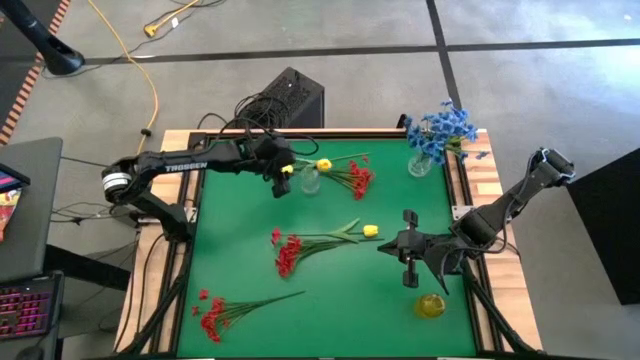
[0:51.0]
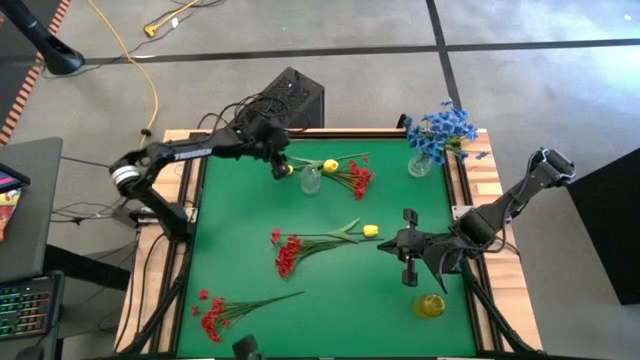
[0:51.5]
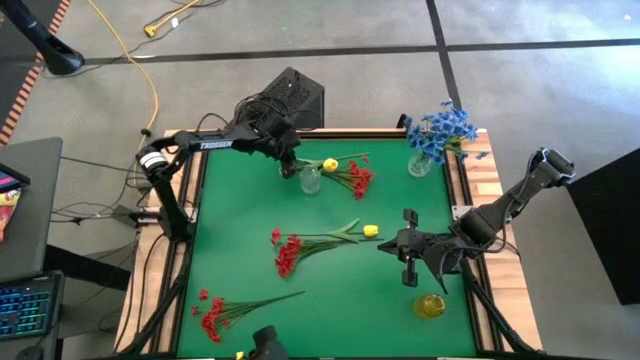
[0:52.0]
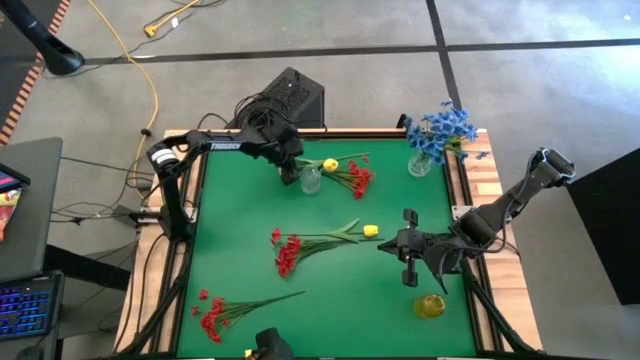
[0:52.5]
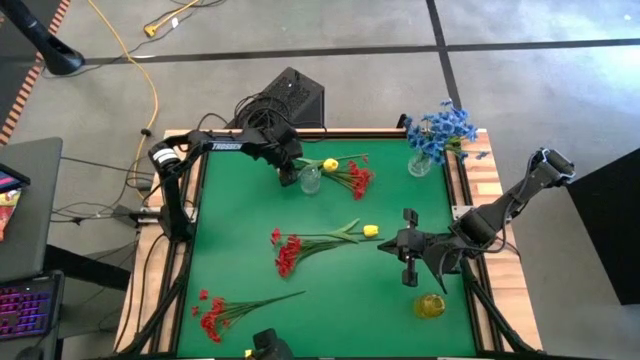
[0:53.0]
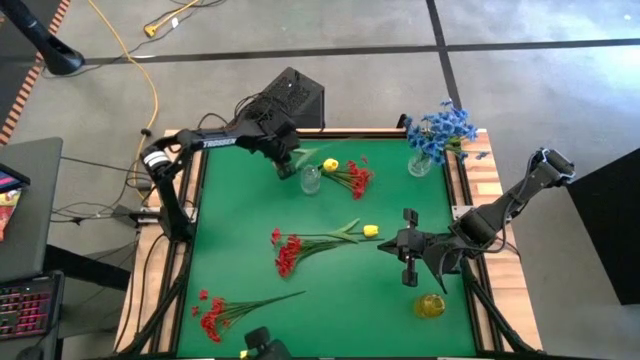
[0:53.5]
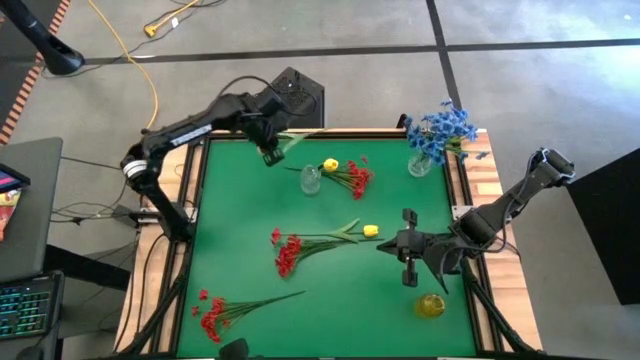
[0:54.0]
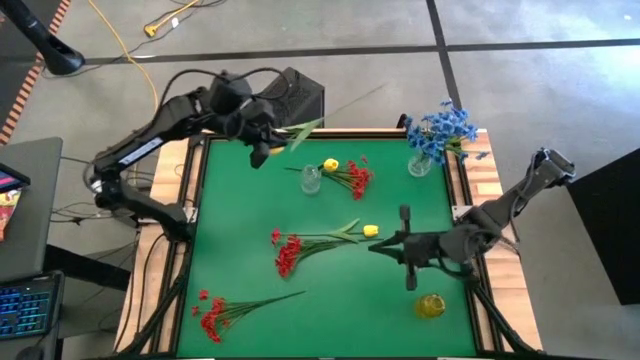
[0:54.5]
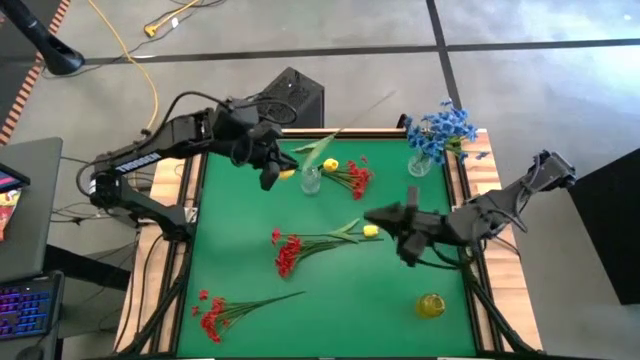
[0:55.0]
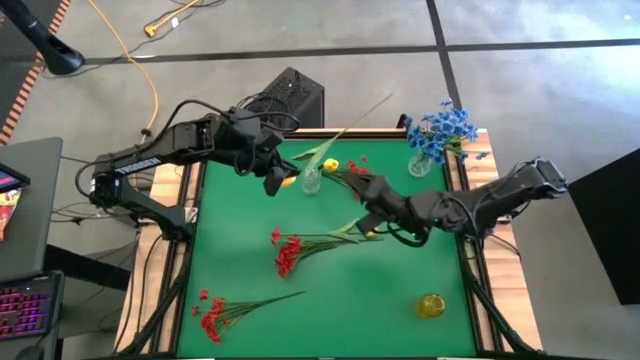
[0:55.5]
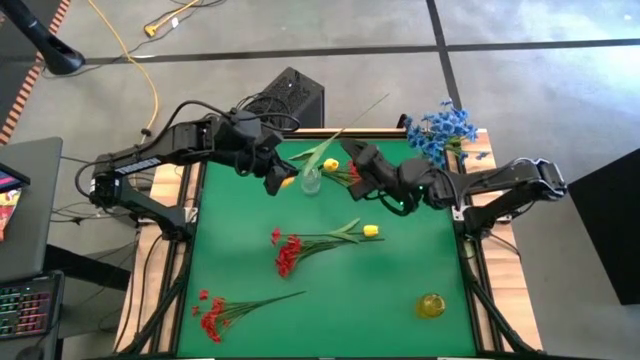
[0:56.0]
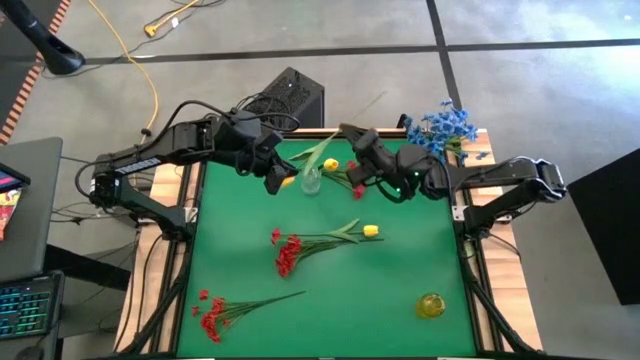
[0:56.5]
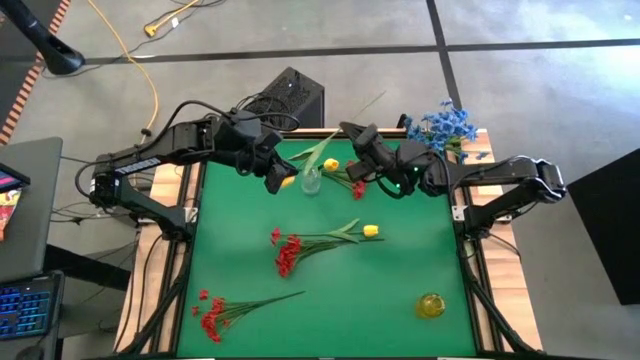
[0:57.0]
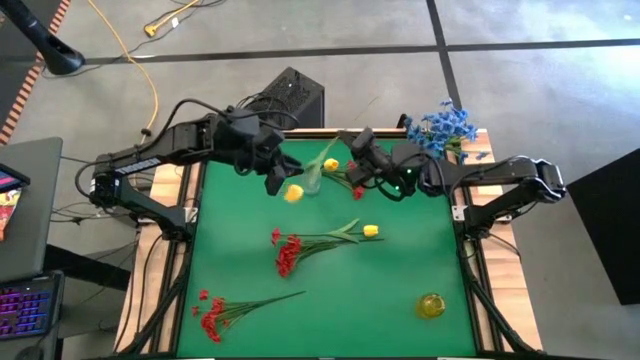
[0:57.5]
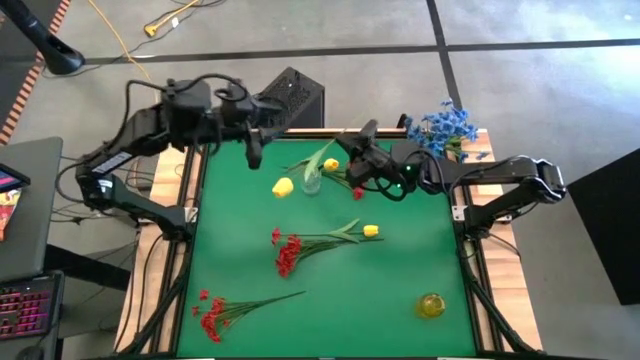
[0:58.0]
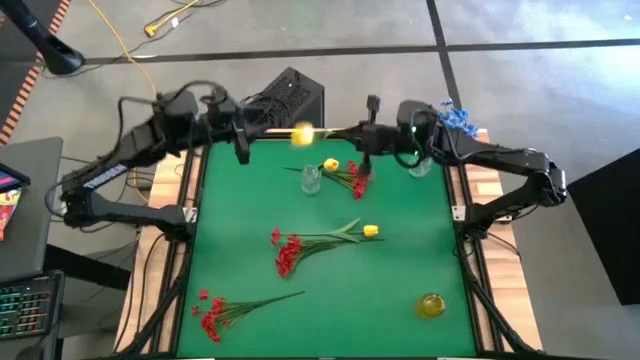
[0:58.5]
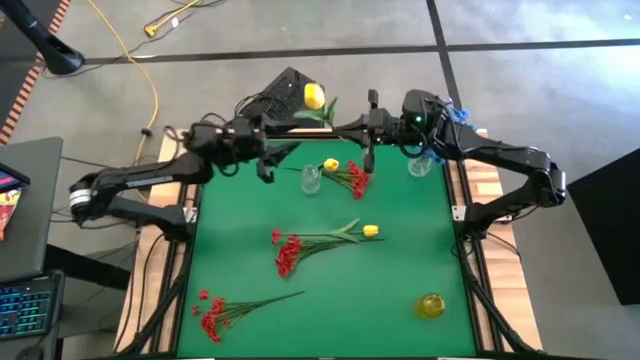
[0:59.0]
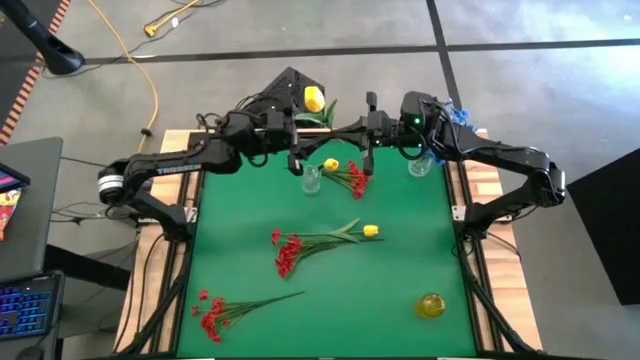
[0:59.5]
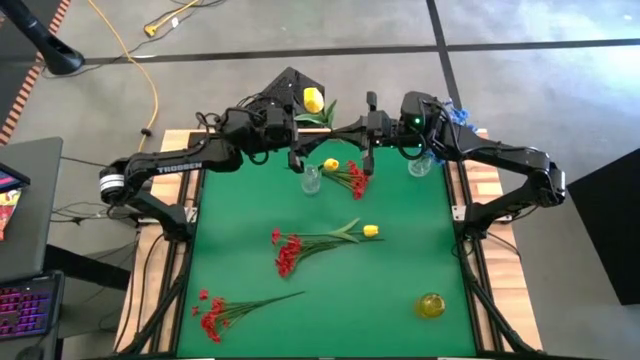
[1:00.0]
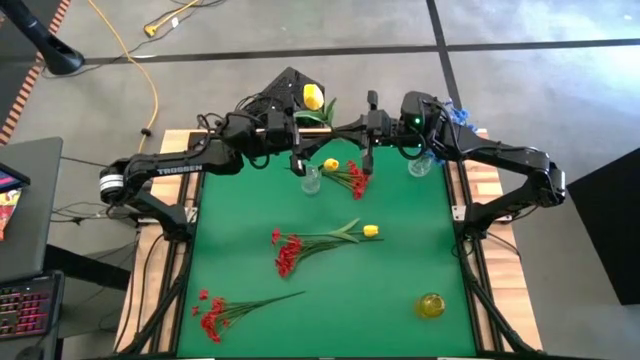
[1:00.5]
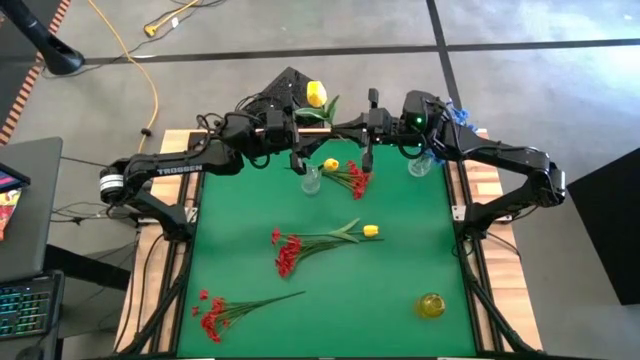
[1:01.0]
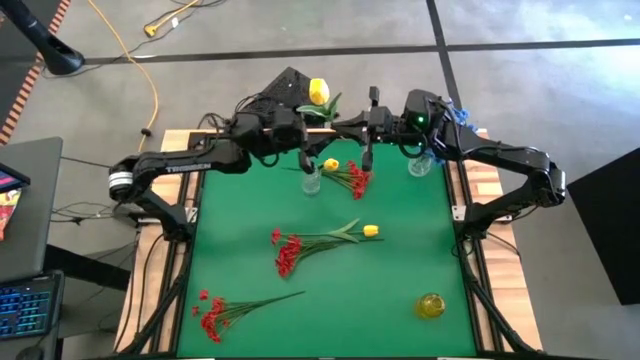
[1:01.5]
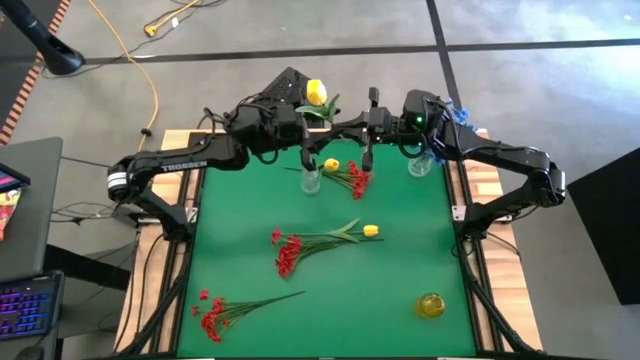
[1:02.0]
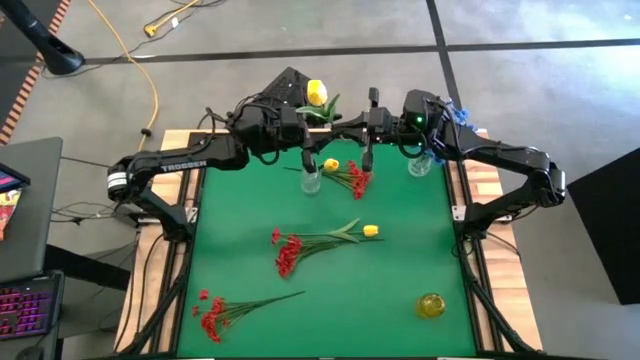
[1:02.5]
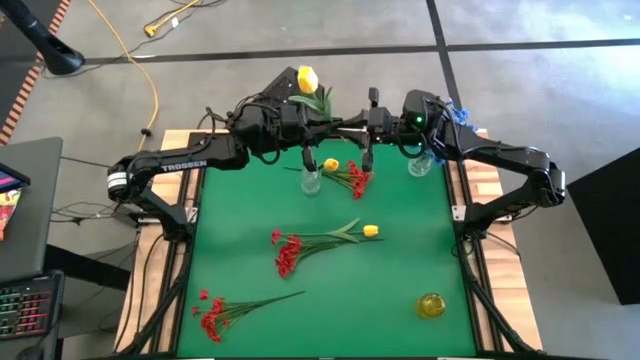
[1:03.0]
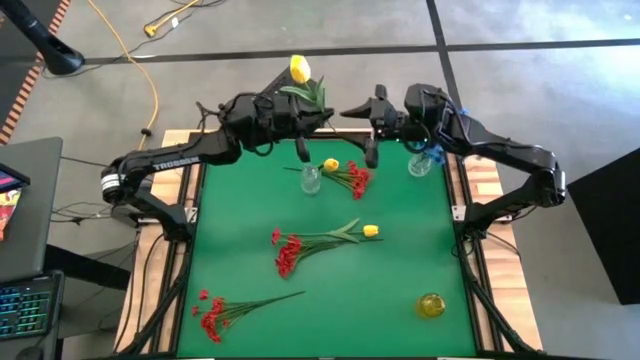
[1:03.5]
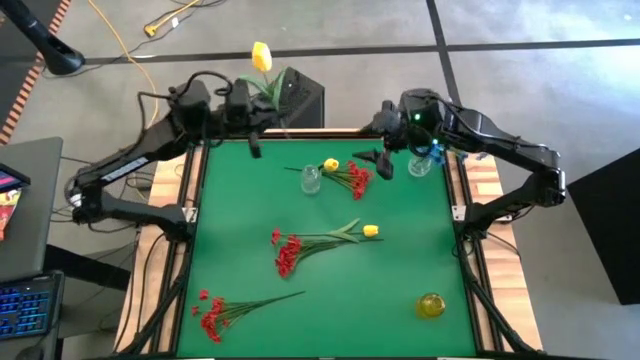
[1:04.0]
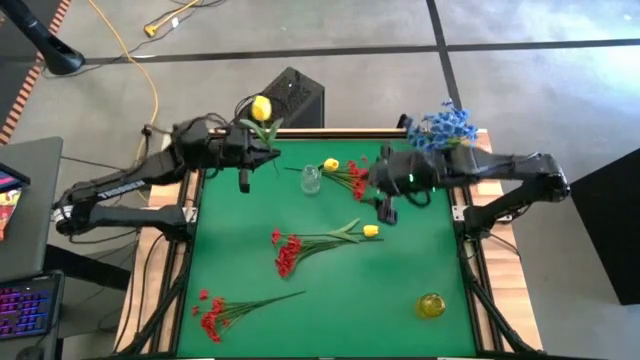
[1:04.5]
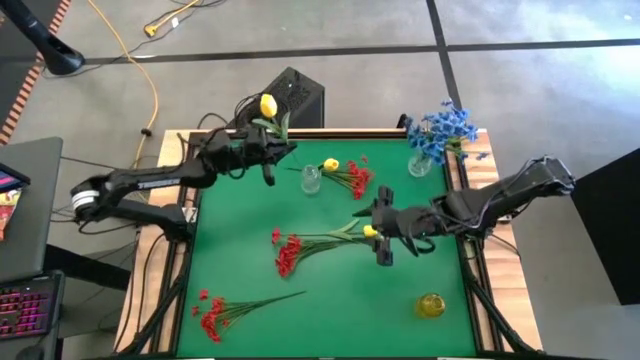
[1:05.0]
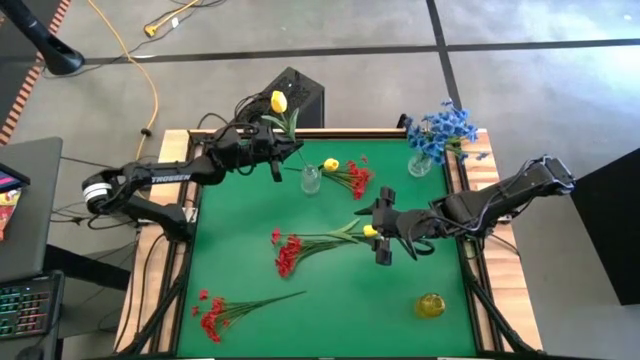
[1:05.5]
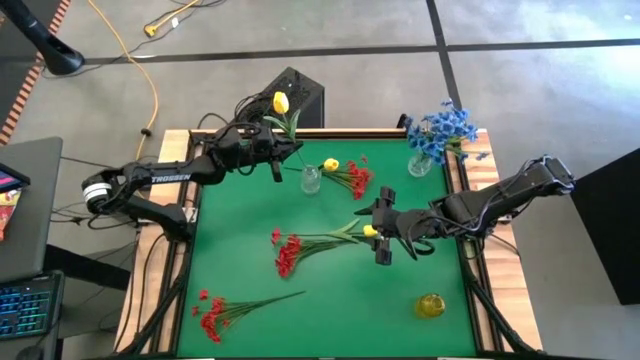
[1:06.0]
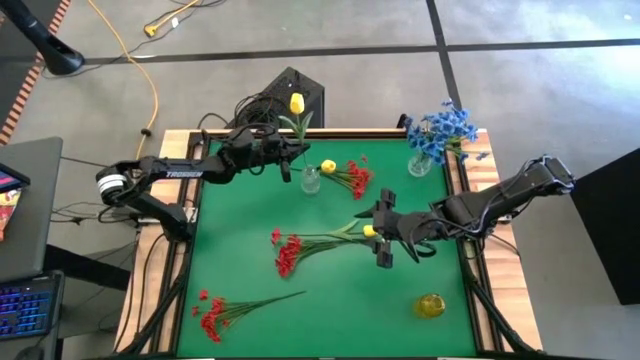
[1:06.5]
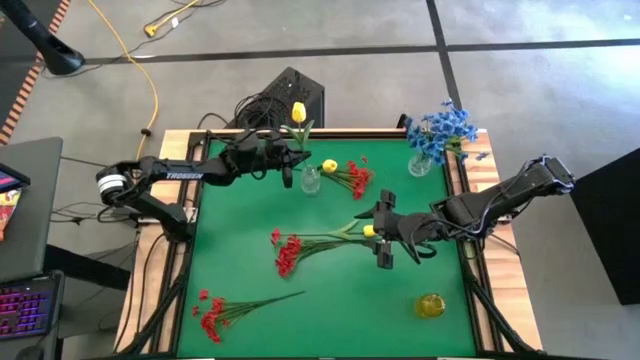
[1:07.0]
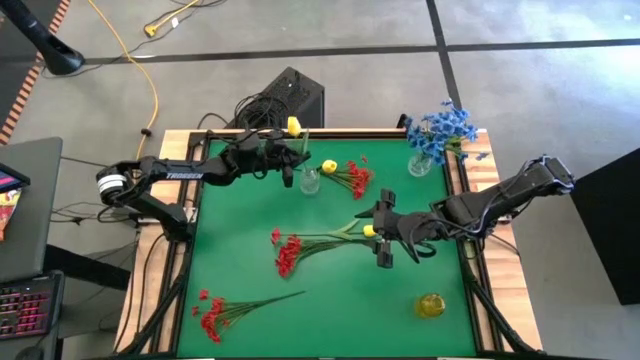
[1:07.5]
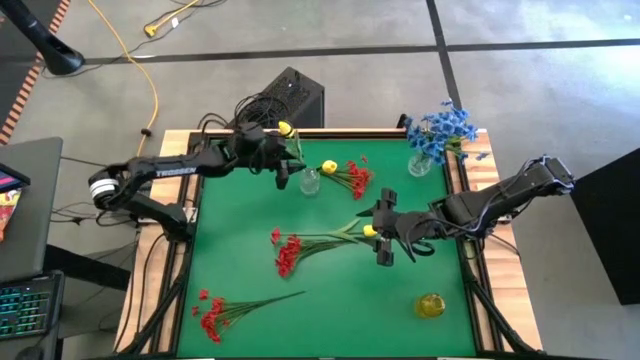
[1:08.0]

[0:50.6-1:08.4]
Task: Sort flowers into vase by color
Put the top yellow tulip into the left transparent vase

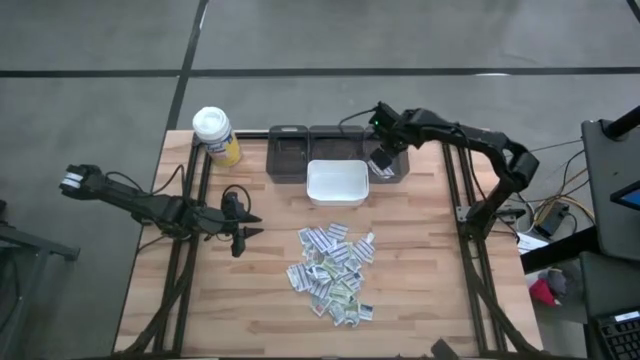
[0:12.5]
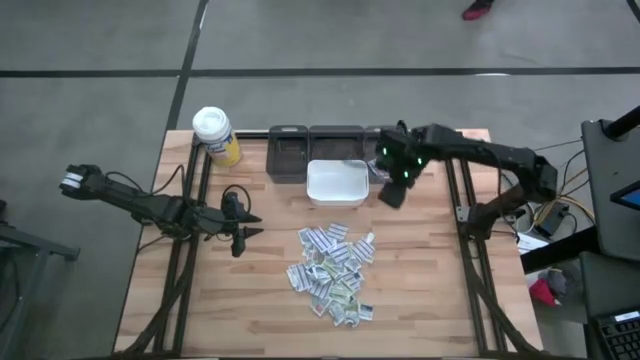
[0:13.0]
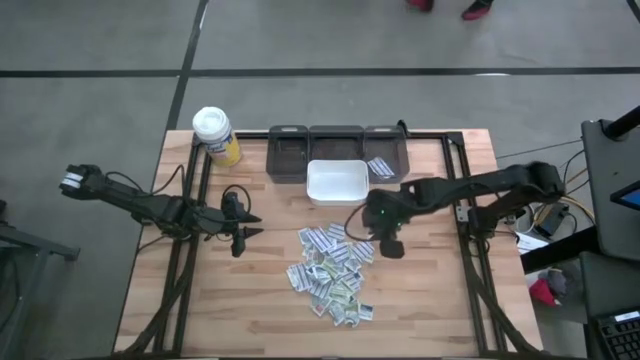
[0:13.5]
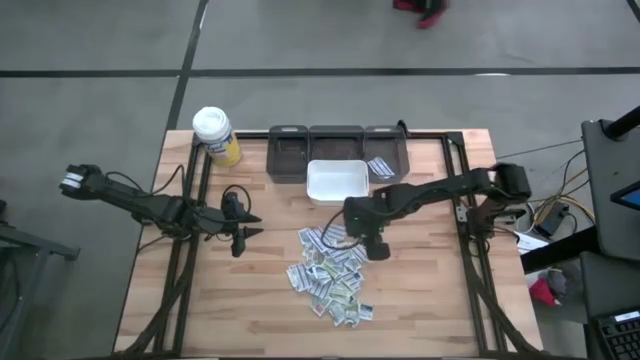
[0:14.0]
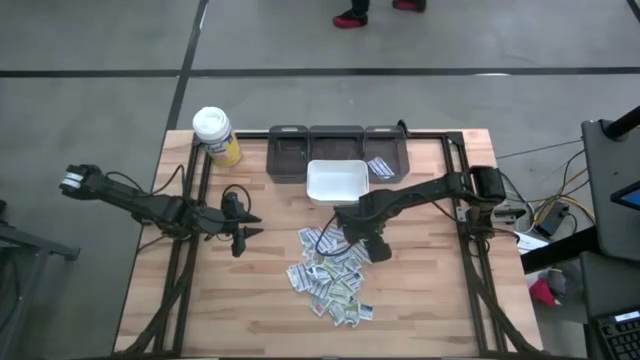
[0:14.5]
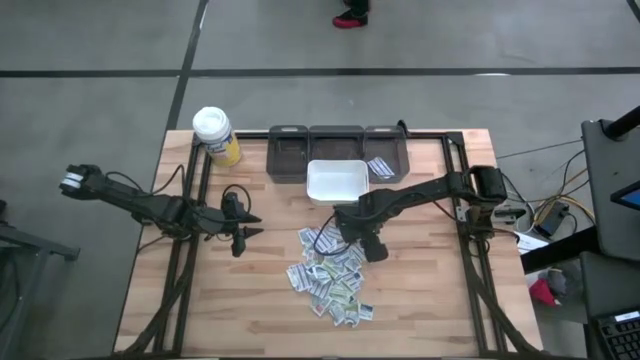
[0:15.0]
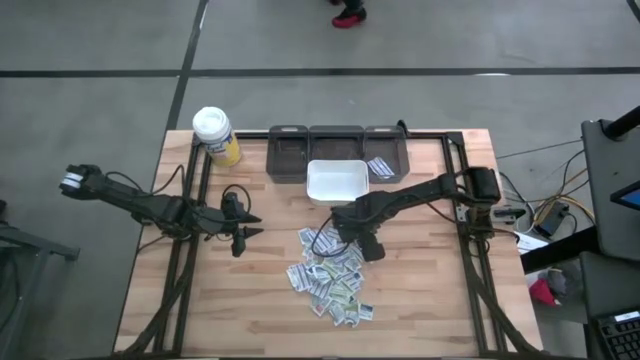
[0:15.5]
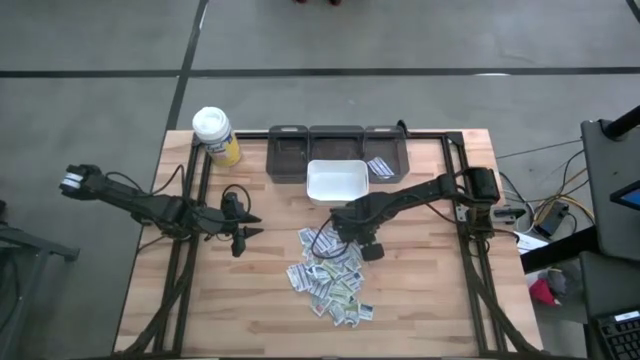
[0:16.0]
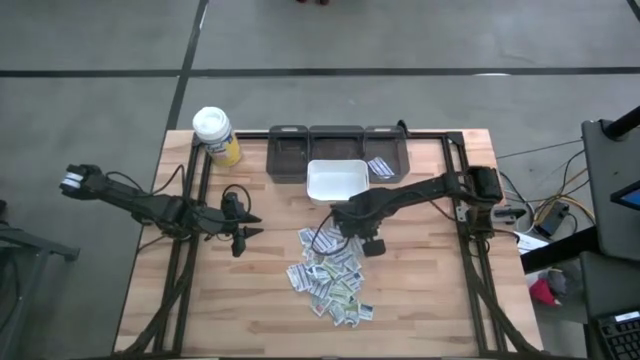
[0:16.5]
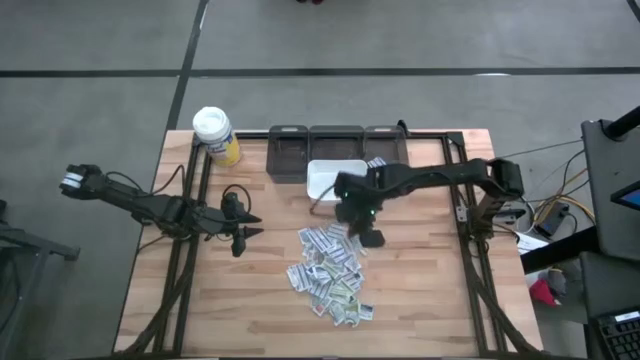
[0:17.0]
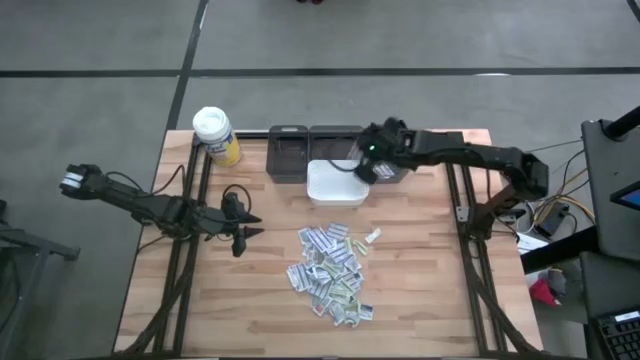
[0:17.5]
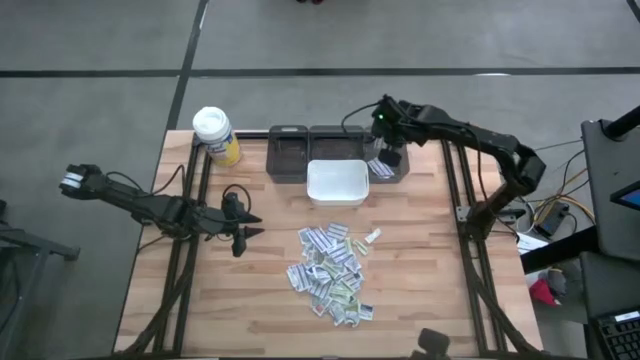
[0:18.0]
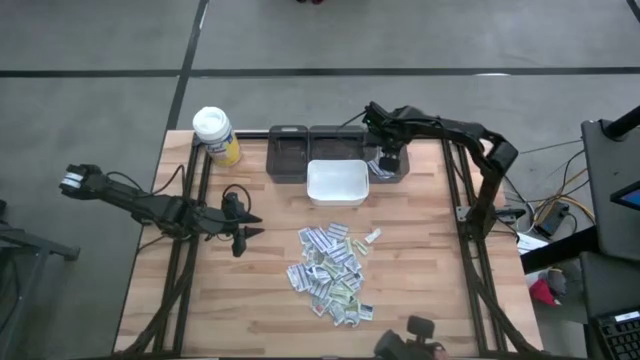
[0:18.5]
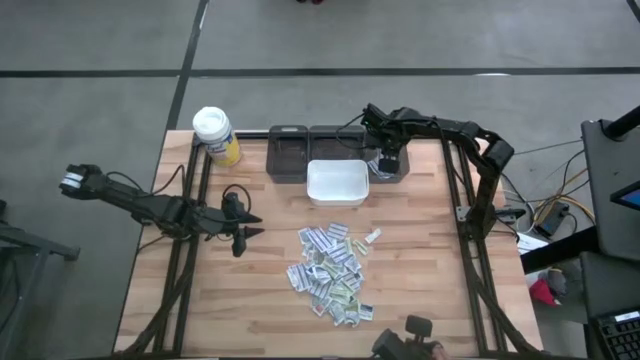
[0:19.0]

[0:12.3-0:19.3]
Task: Pick & Place First Aid Supplies
Put the blue bandage pack into the right black bin
